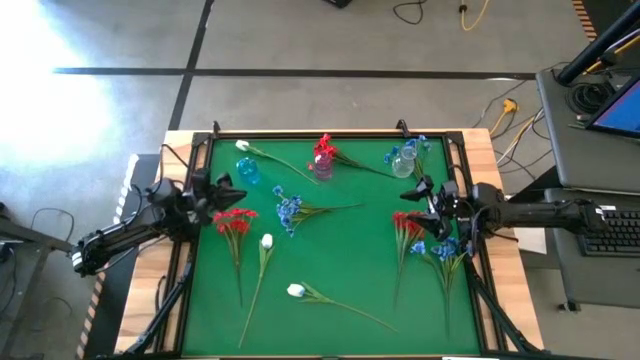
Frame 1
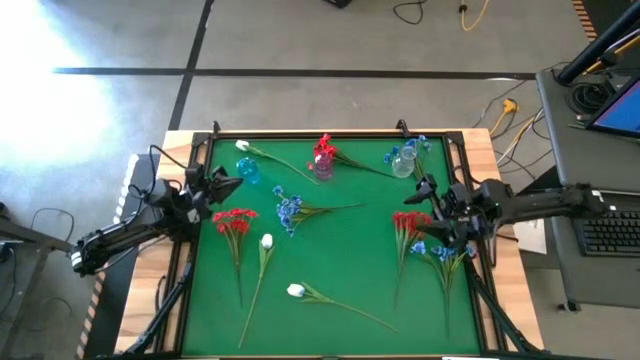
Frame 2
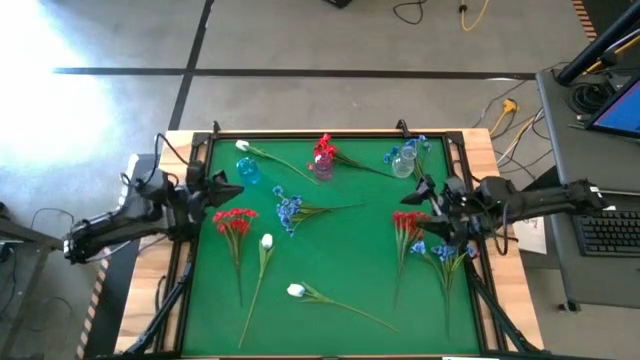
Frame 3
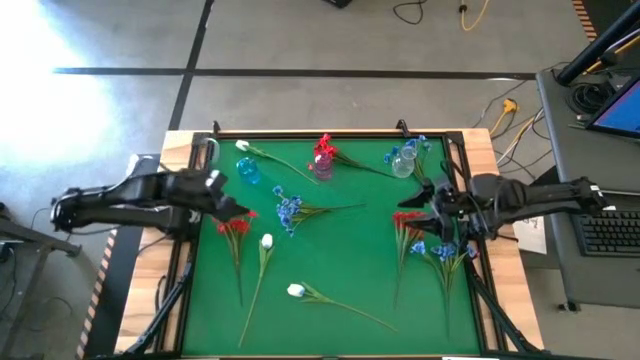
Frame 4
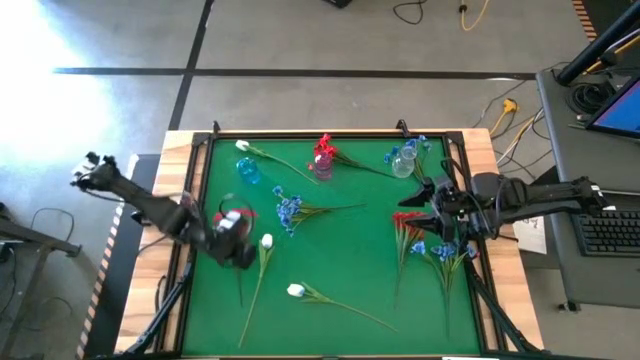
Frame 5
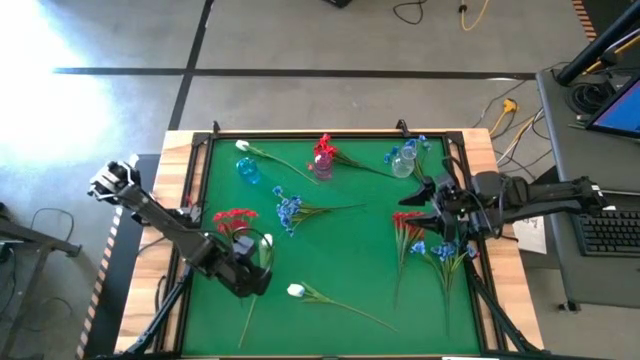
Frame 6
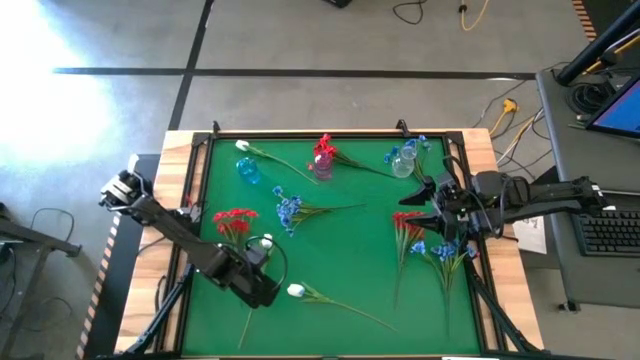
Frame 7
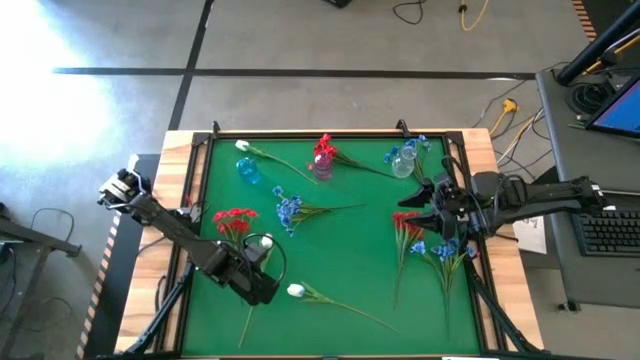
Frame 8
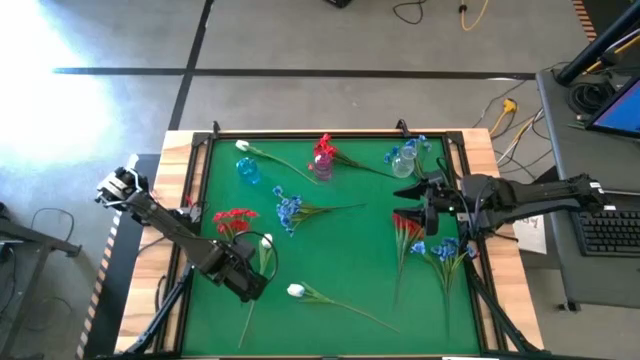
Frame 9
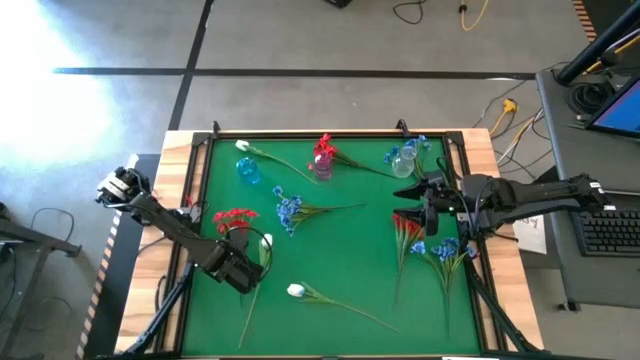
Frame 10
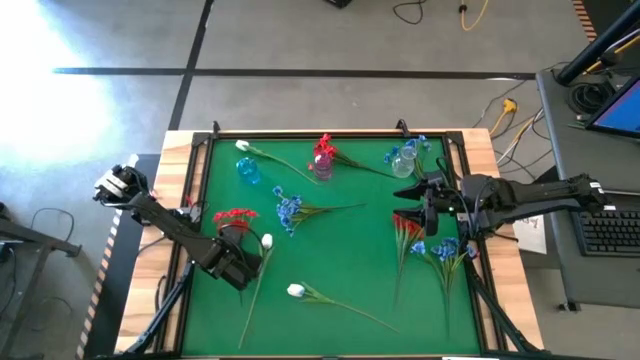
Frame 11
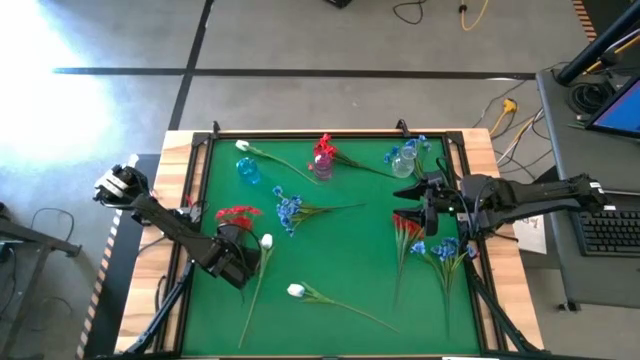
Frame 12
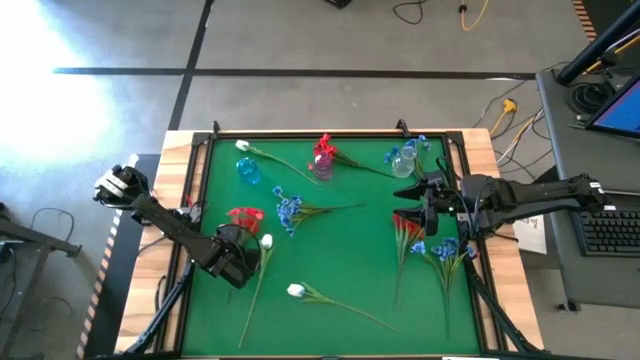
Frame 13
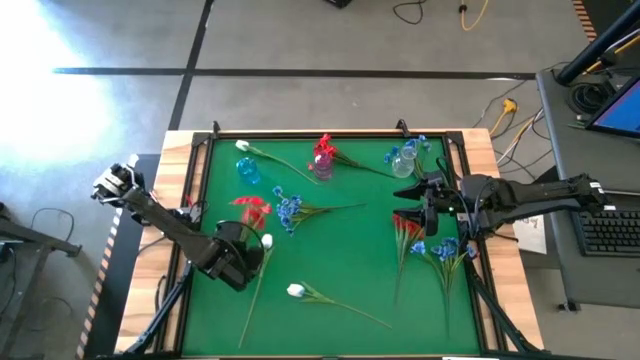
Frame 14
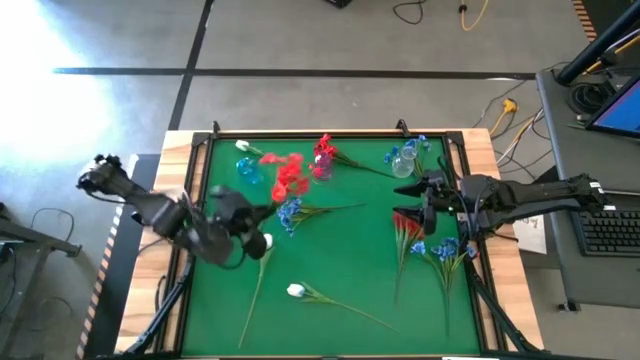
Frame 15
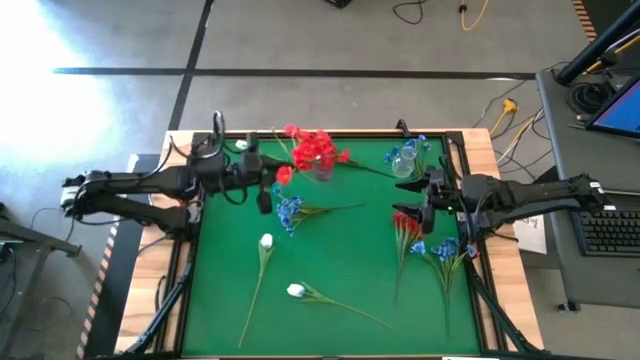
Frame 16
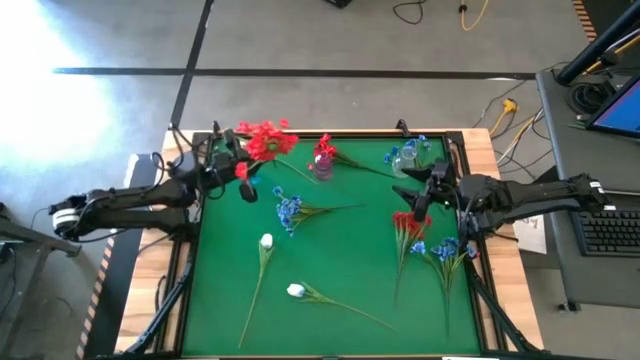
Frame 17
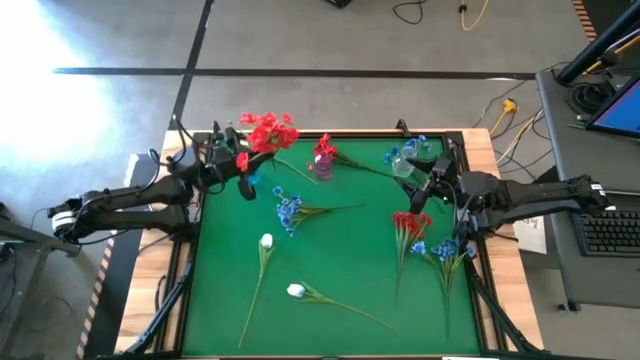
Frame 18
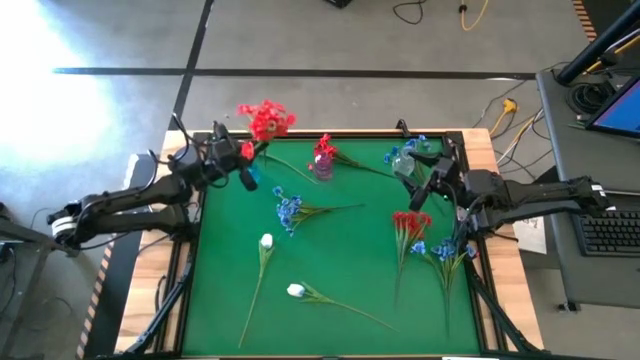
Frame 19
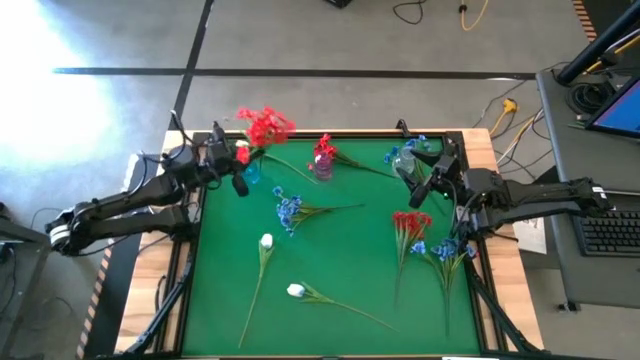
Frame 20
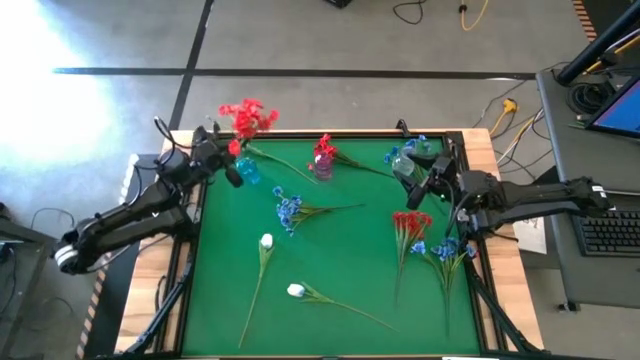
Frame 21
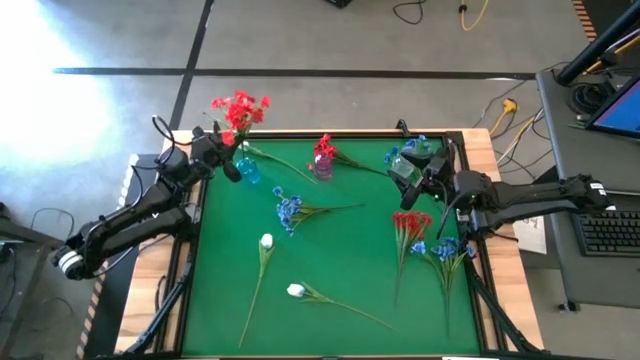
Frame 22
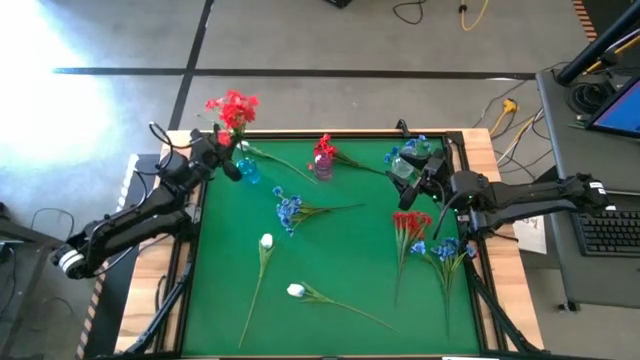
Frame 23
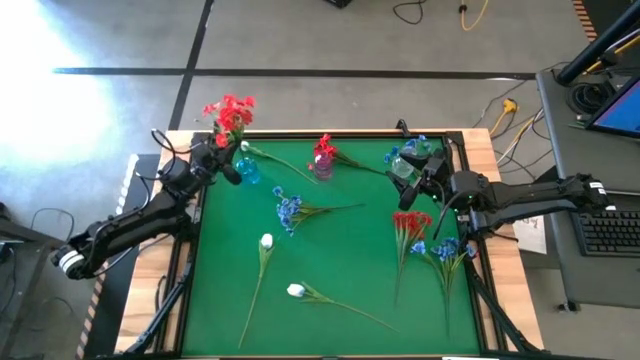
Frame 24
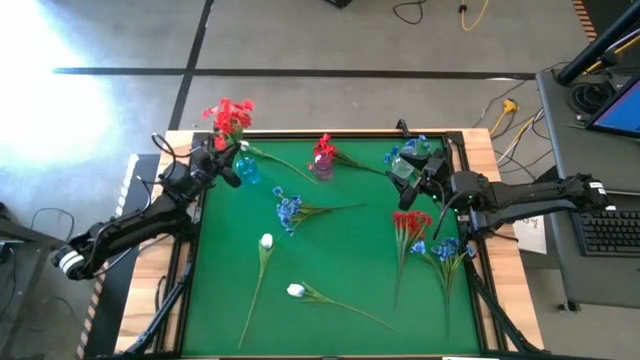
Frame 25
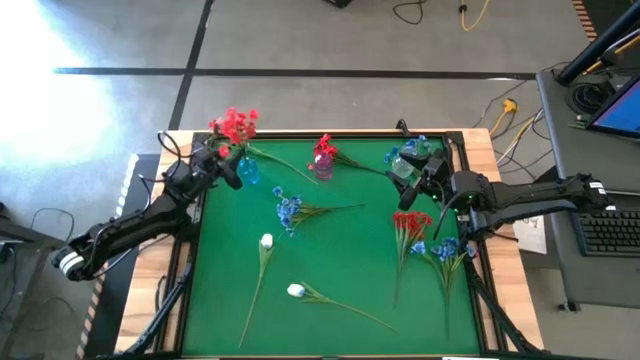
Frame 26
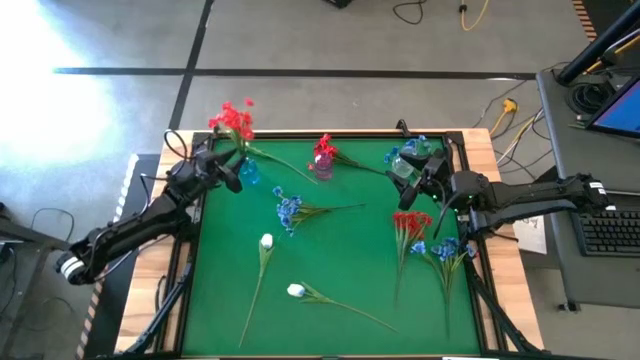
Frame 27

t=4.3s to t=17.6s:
Task: Sort flowers into vase by color
Put the left red flowers into the blue vase

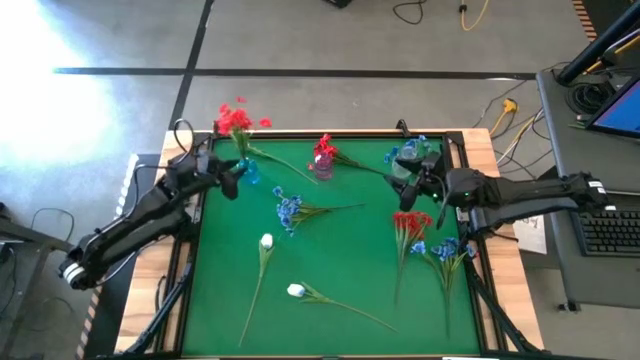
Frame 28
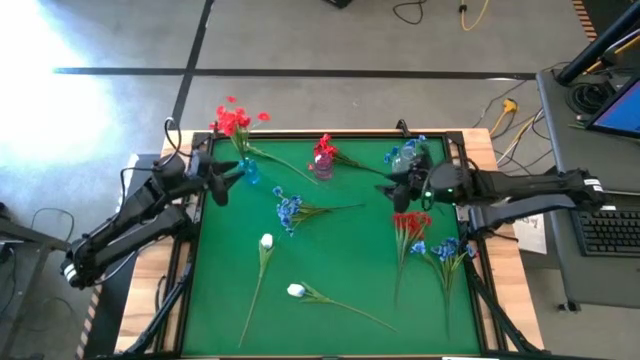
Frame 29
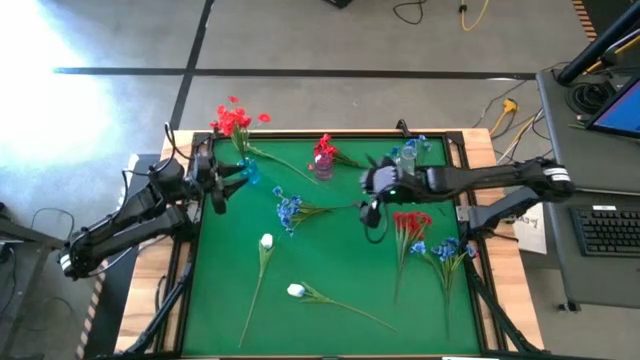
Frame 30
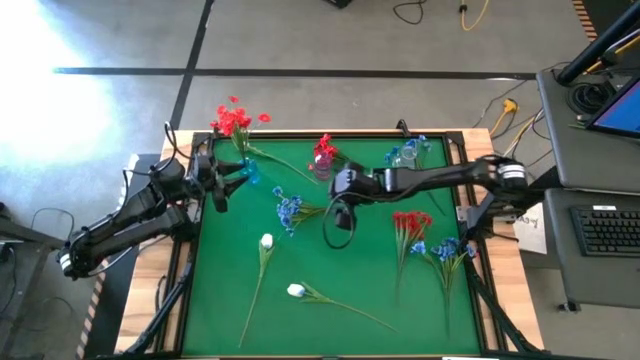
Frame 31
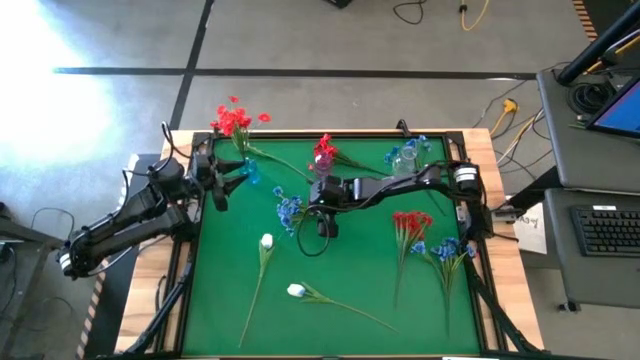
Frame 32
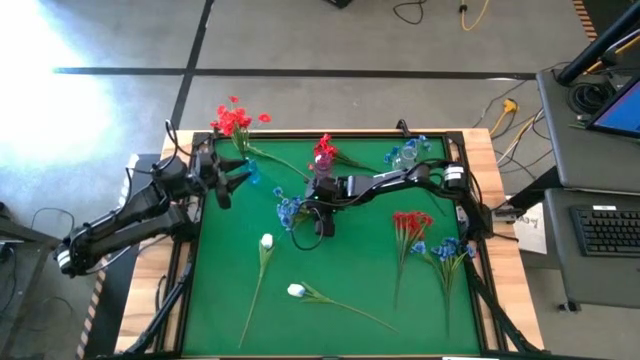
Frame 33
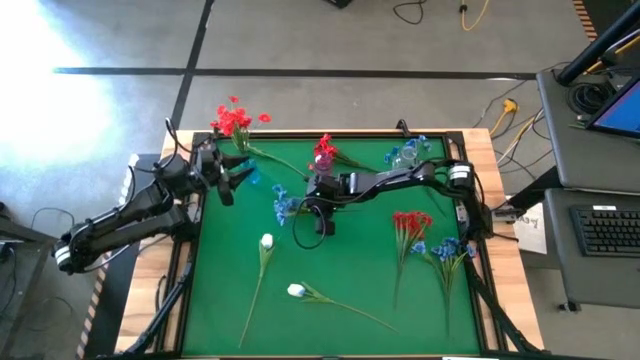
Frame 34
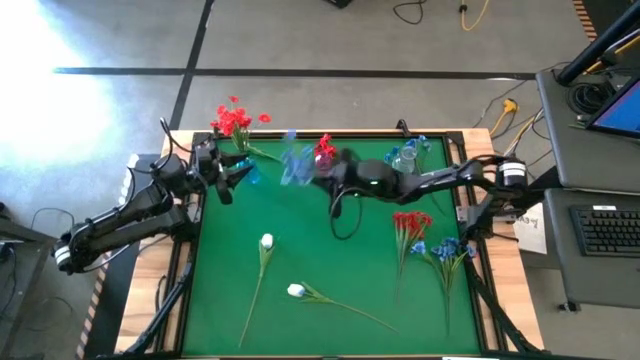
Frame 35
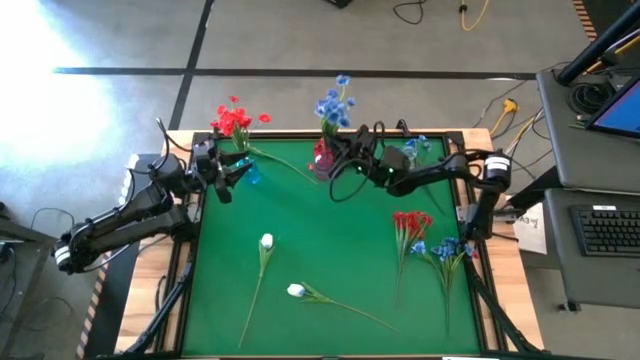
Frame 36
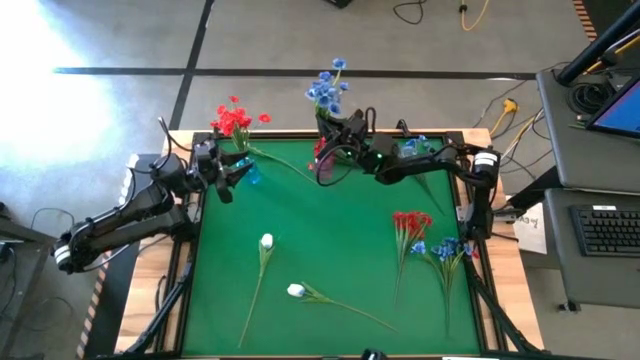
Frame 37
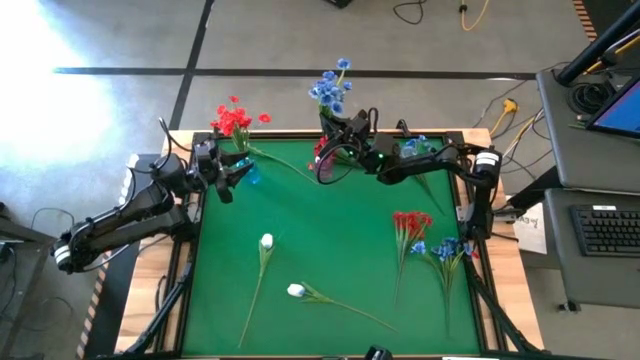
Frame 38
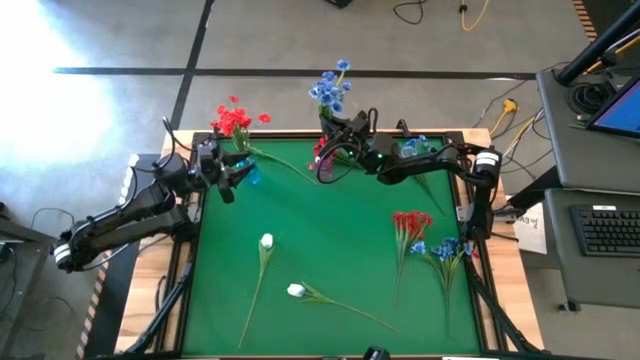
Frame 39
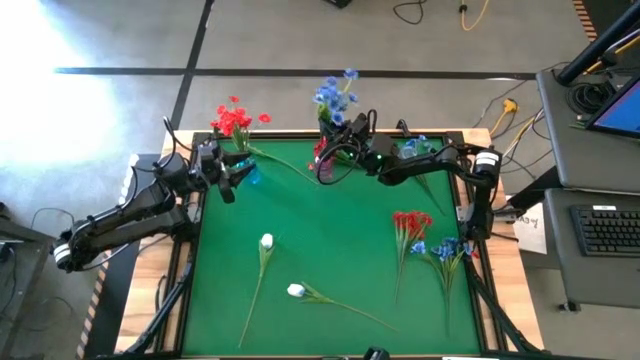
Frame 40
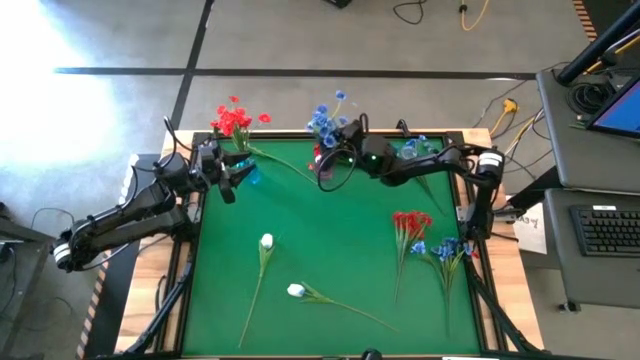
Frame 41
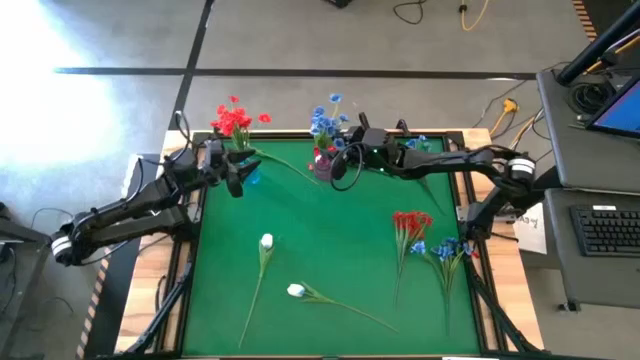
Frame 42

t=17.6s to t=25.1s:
Put the left blue flowers into the purple vase

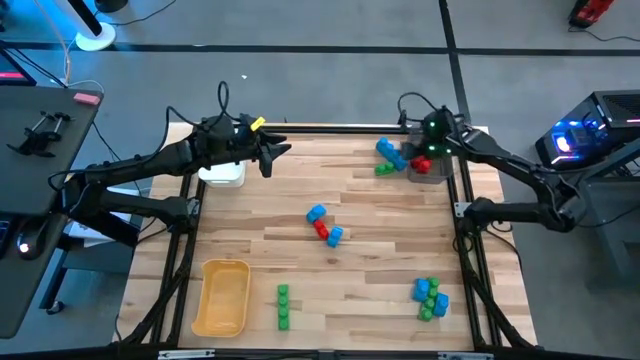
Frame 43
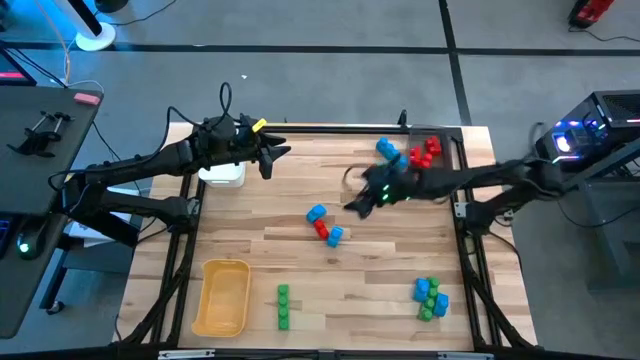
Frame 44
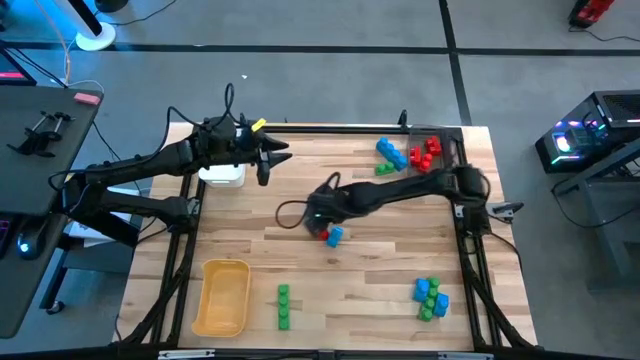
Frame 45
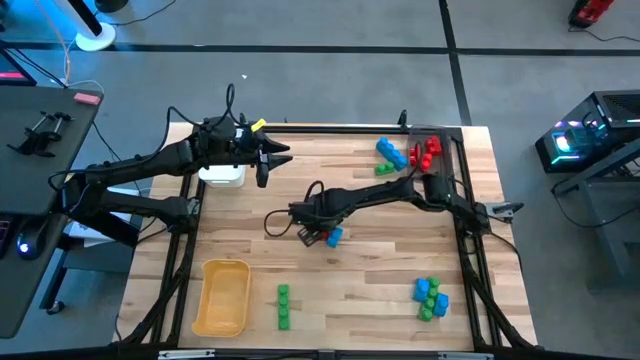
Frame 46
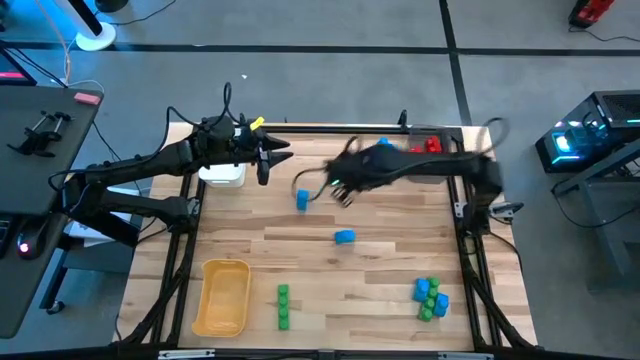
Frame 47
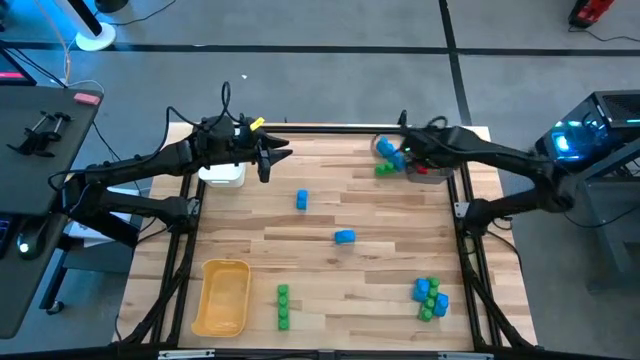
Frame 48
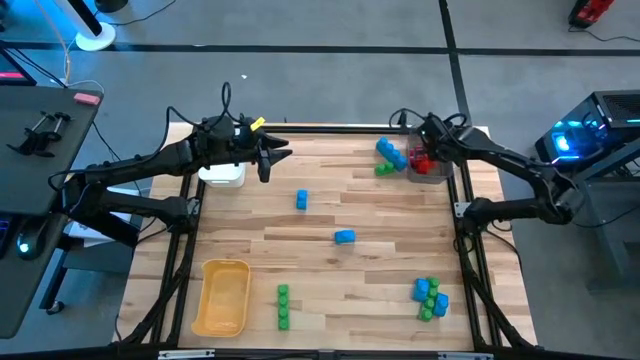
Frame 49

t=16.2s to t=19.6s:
Task: Sort blocks
Put the red game piece into the black bin
